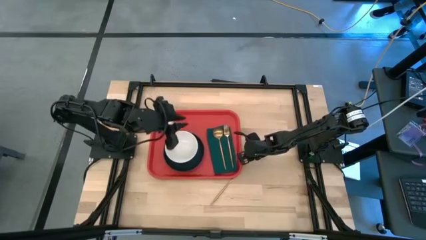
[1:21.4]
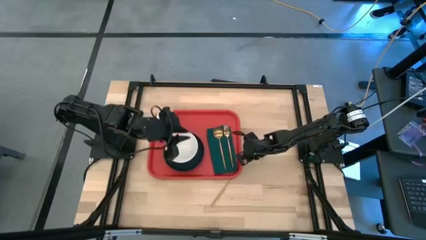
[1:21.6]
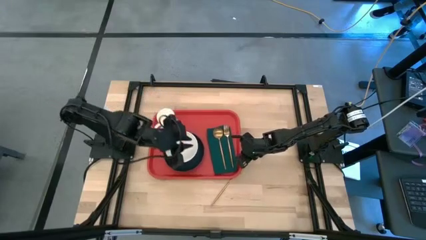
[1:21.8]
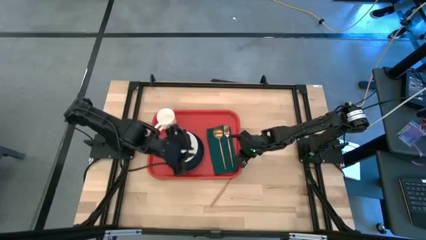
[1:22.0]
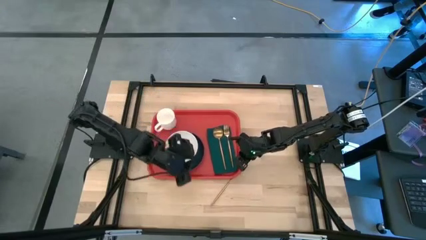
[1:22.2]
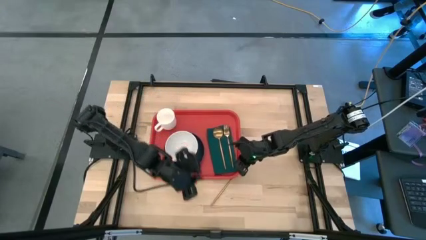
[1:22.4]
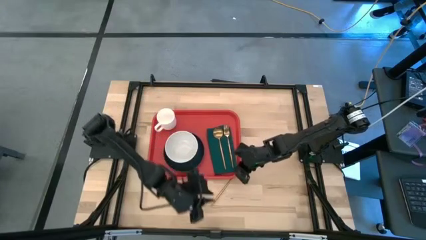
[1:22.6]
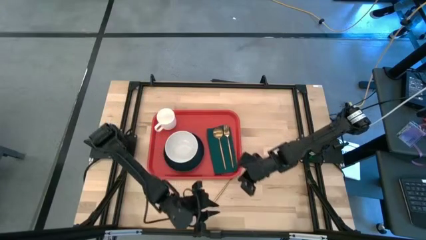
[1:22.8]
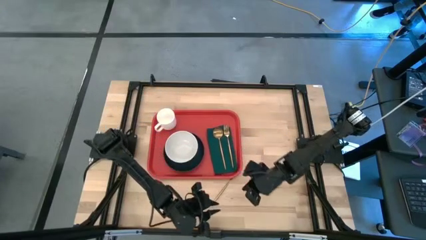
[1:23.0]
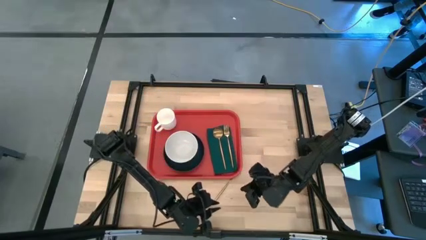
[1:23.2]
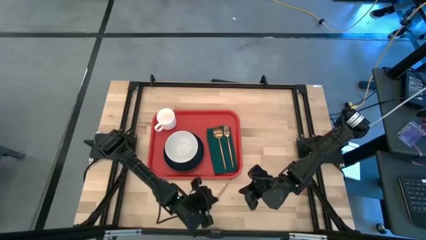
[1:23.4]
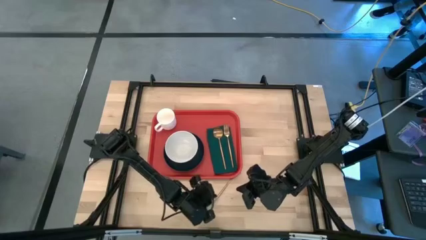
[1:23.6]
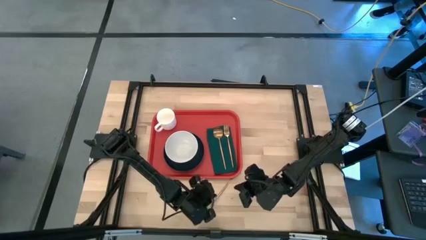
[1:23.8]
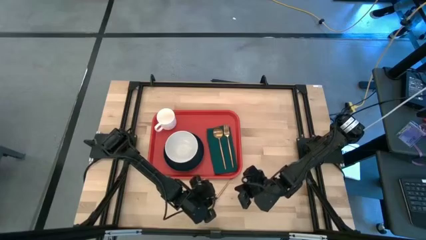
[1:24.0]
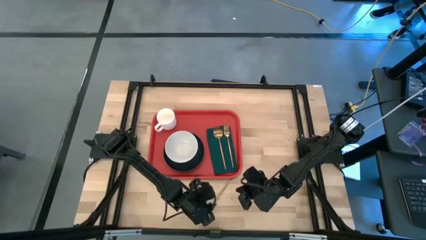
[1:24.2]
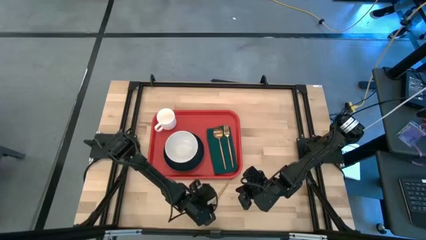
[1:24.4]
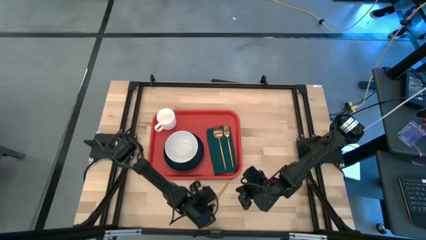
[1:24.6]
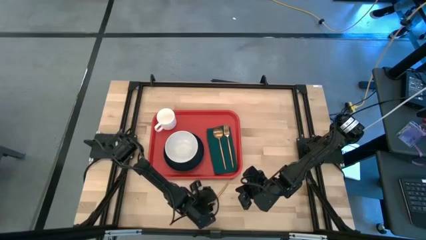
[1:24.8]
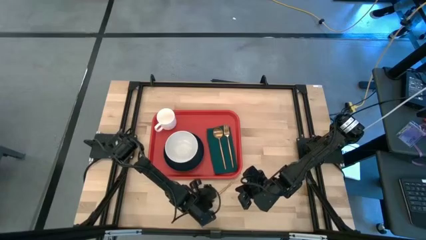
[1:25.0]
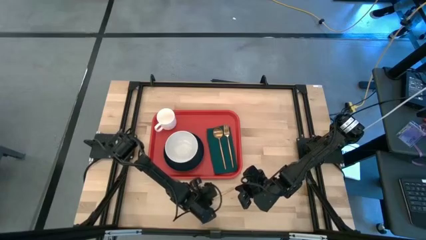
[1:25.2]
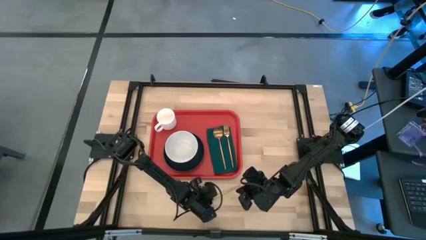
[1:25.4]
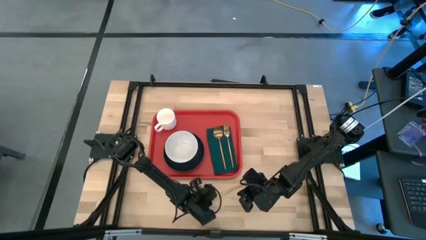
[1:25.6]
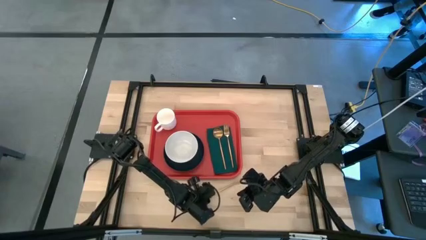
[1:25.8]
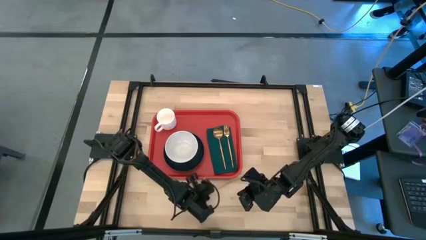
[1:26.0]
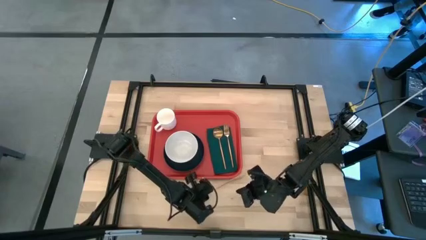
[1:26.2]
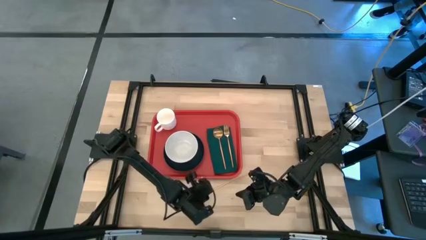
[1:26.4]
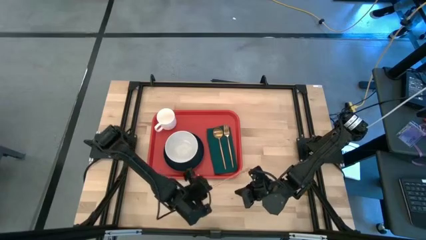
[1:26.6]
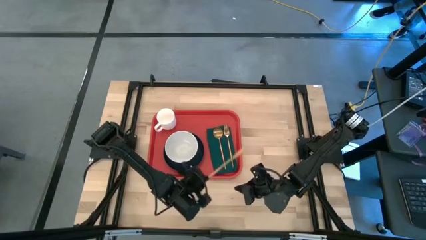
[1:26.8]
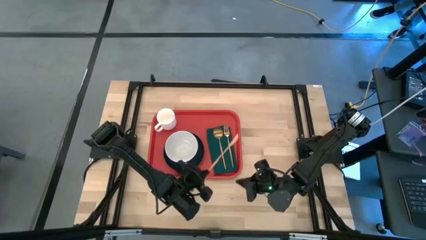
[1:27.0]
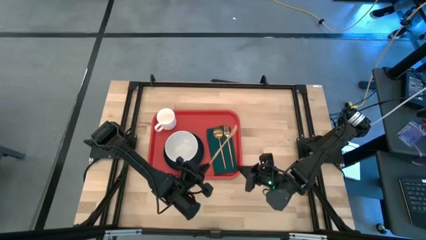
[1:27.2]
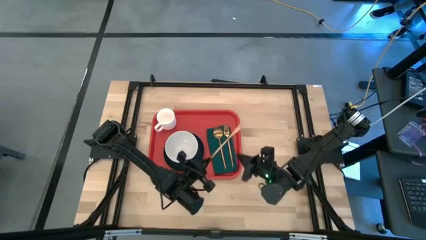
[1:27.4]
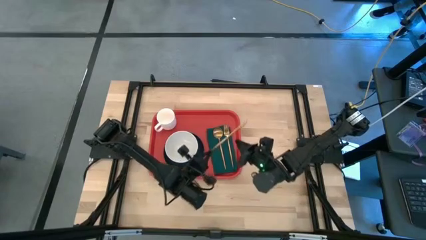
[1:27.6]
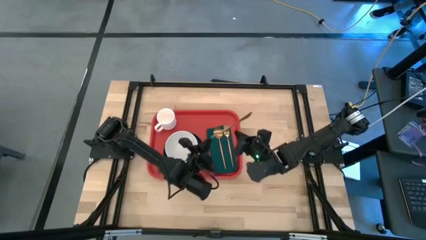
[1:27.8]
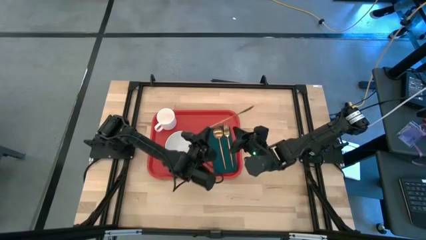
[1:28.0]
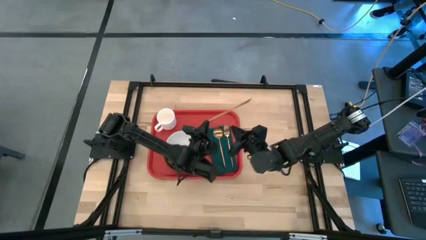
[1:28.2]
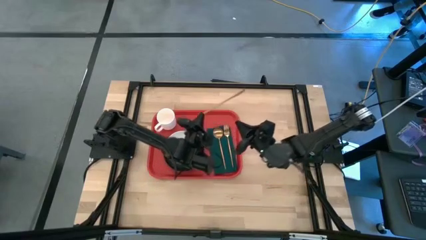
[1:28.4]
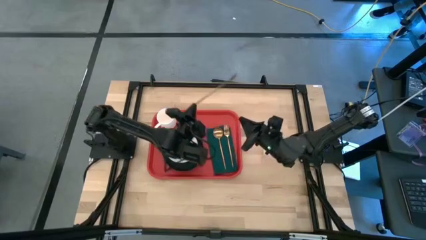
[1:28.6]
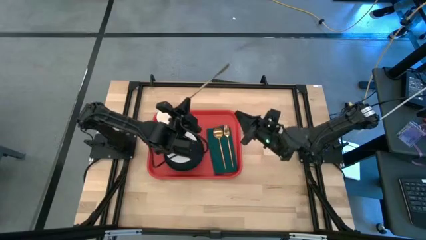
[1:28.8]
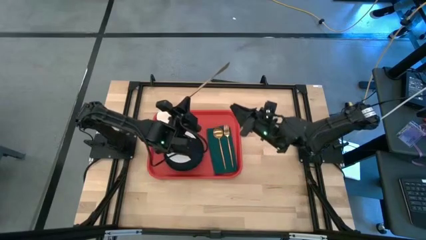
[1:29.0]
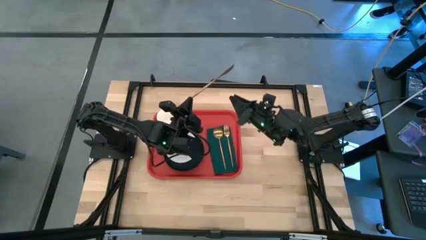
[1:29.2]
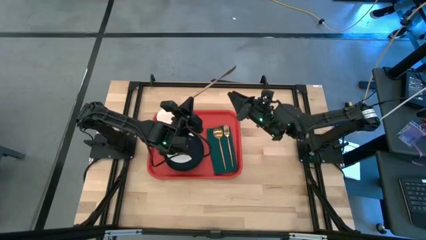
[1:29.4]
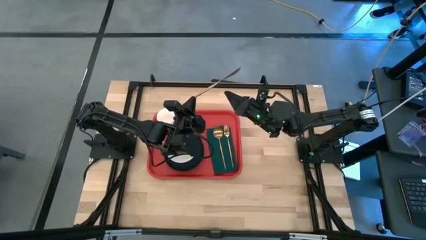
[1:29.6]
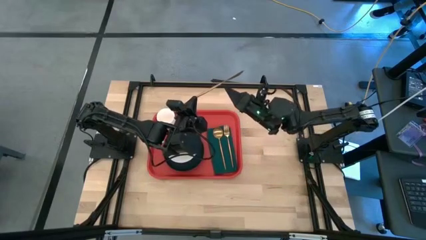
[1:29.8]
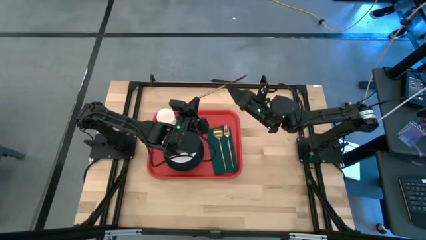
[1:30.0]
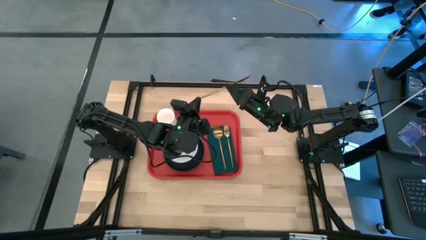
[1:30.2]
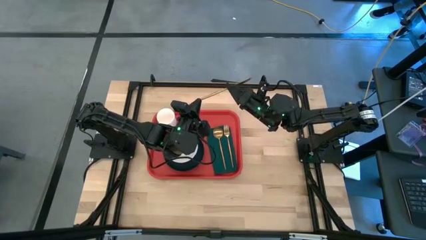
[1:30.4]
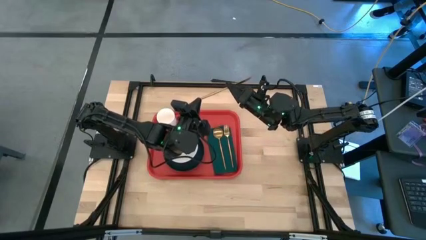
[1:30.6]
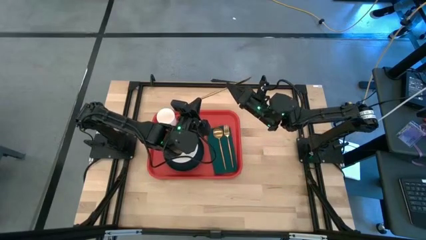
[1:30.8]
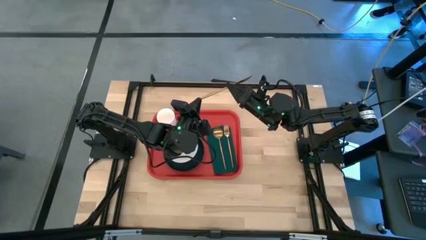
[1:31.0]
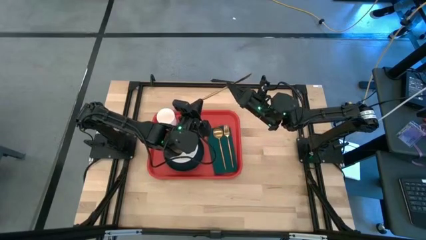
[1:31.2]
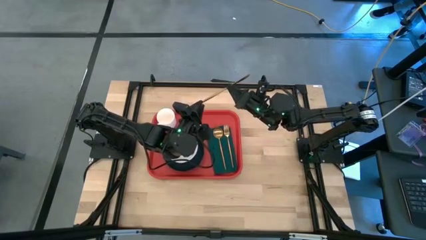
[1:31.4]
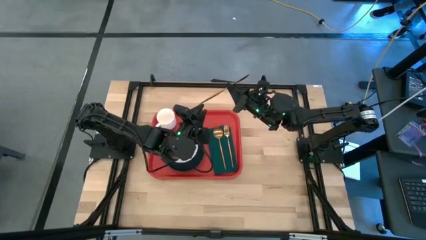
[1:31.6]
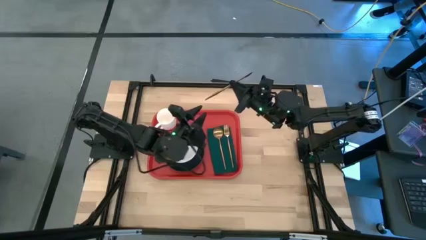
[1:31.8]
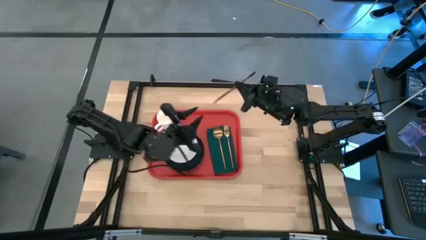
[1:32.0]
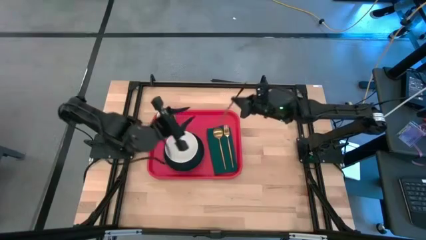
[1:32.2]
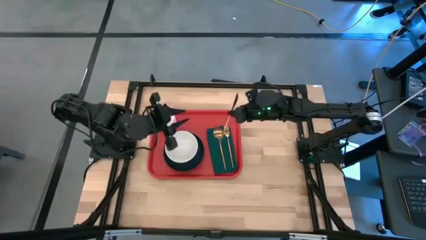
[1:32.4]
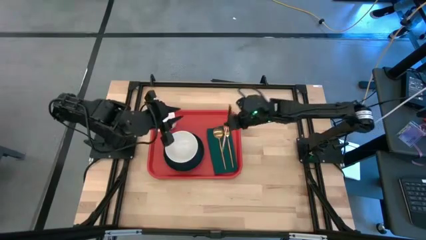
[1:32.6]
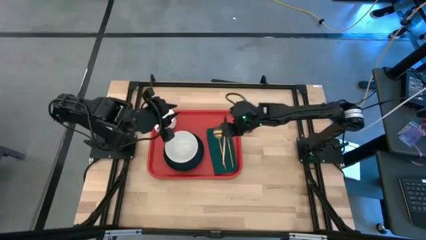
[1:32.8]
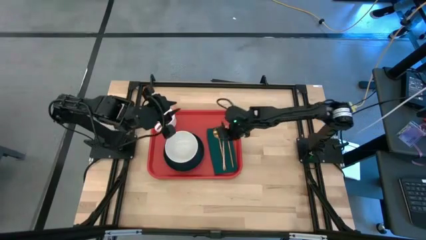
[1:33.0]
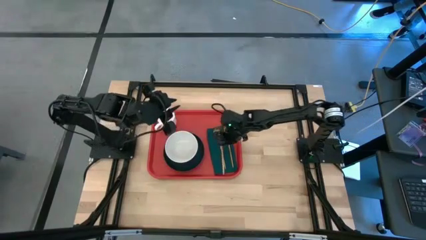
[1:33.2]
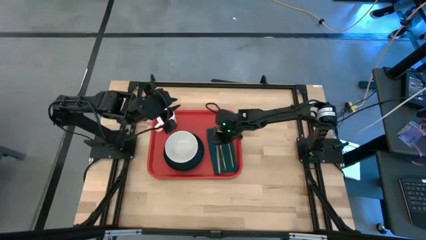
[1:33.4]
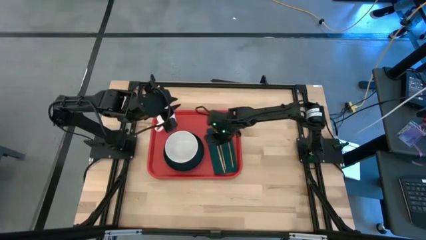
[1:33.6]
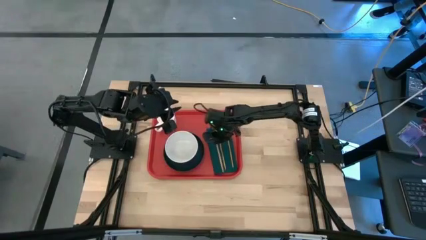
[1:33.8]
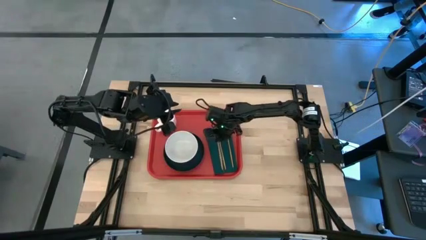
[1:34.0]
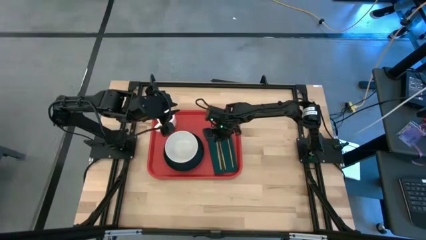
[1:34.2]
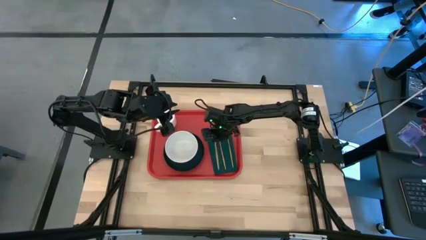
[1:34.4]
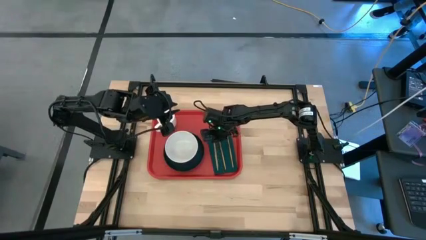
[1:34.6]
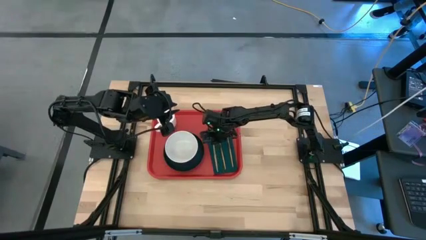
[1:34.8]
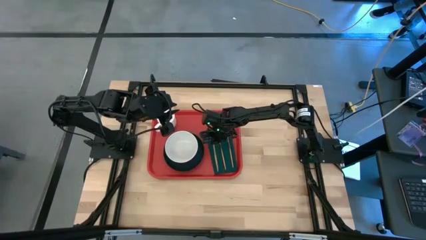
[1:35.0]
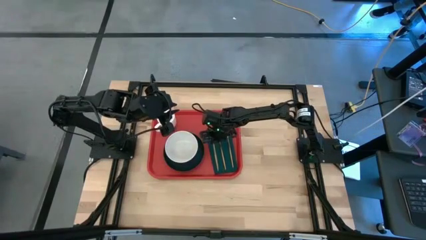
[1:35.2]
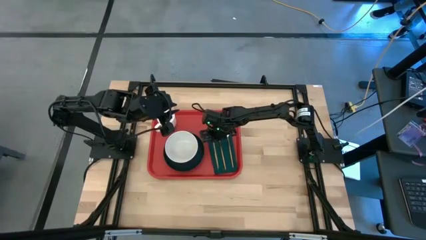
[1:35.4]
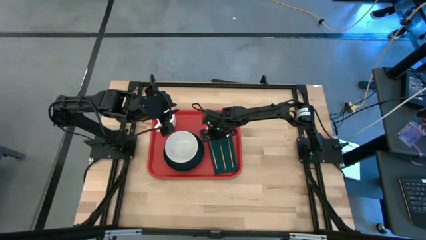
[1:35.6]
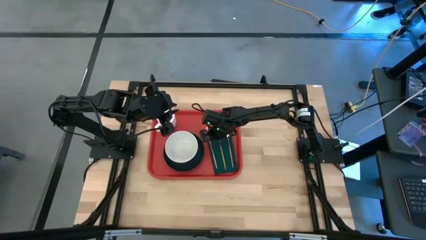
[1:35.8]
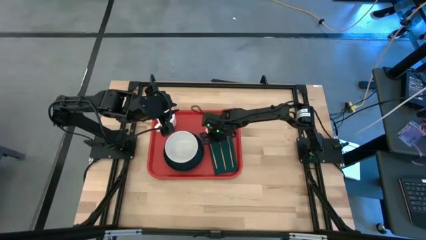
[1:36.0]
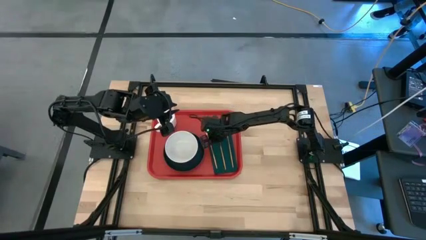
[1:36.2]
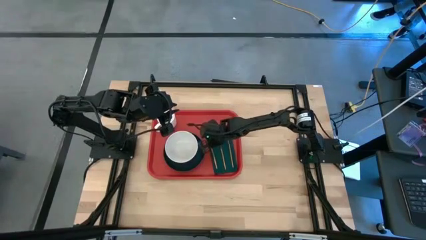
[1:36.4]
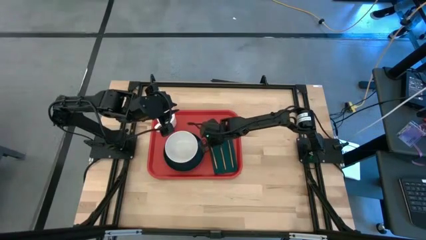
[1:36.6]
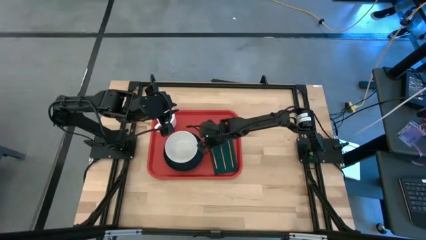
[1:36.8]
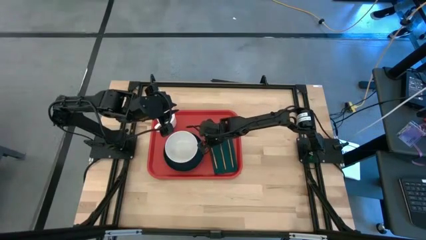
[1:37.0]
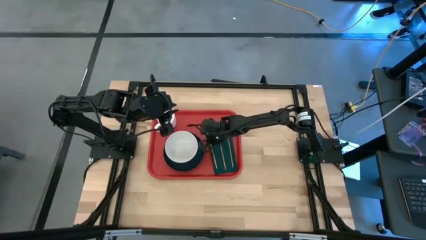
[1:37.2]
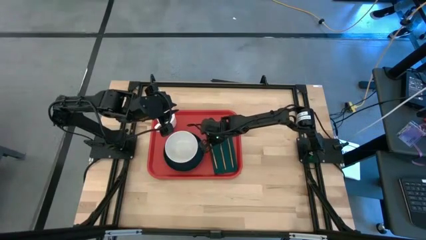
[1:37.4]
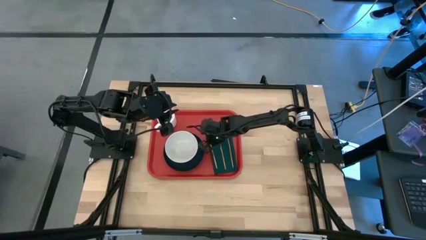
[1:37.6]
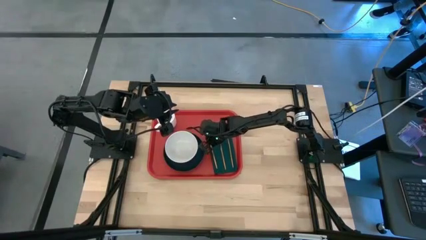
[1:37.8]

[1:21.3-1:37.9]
Task: Set up tray
Put the gold knife to the left of the gold spoon on the green napkin on the red tray
